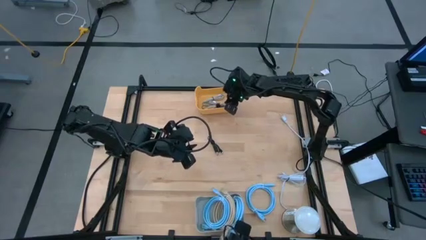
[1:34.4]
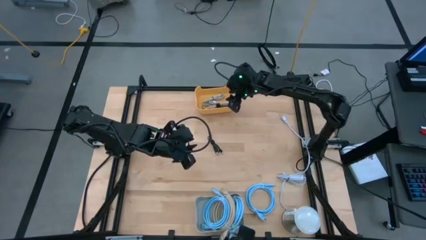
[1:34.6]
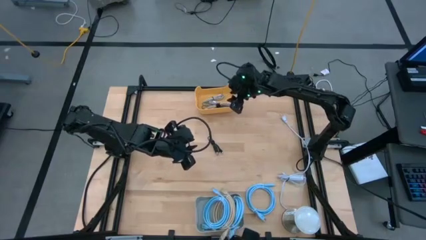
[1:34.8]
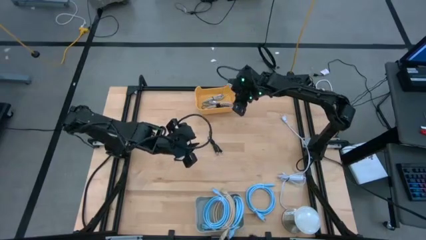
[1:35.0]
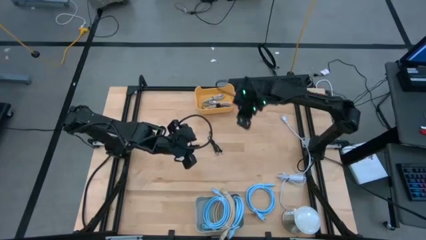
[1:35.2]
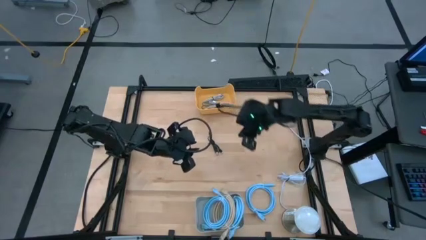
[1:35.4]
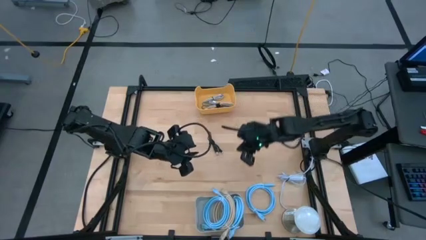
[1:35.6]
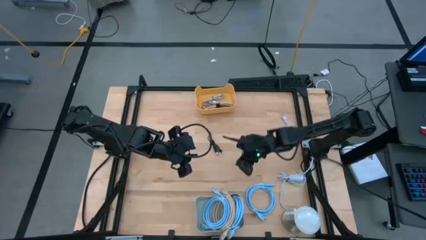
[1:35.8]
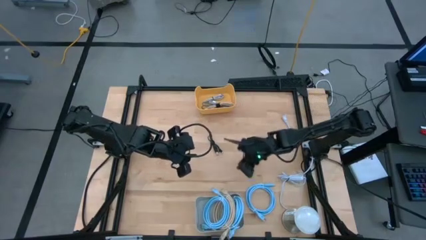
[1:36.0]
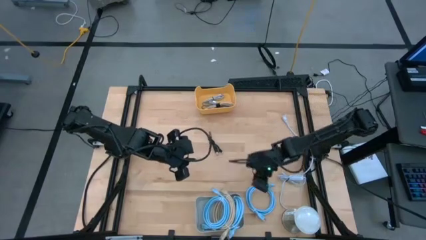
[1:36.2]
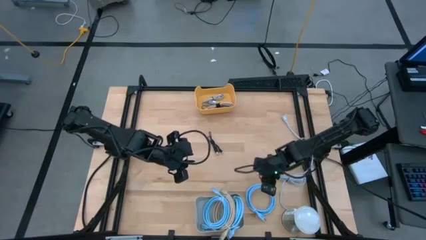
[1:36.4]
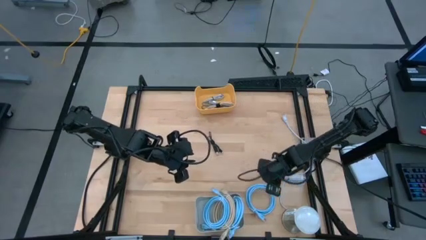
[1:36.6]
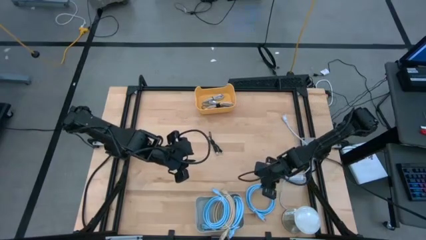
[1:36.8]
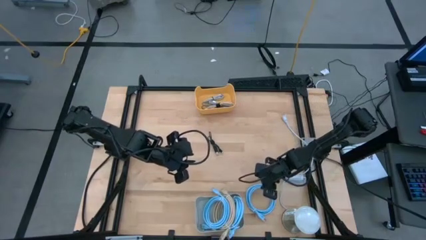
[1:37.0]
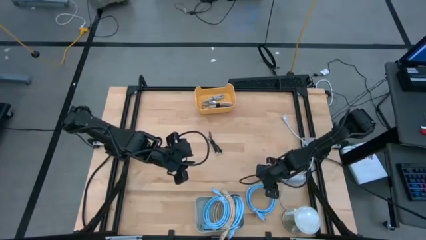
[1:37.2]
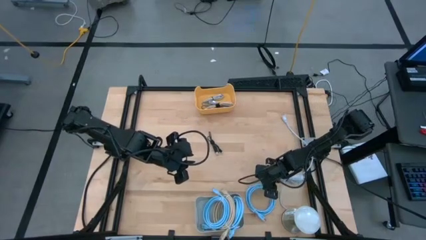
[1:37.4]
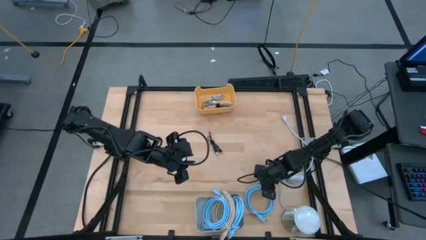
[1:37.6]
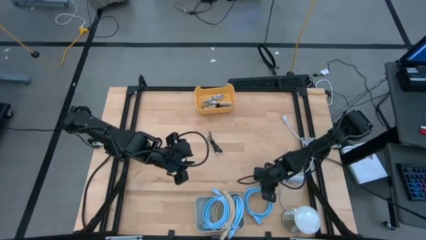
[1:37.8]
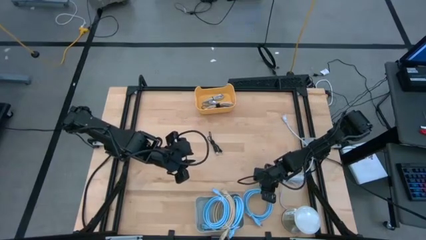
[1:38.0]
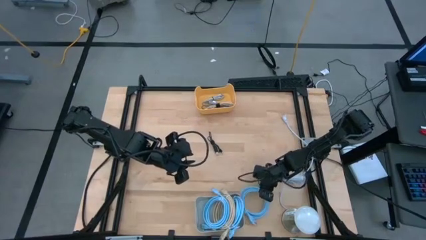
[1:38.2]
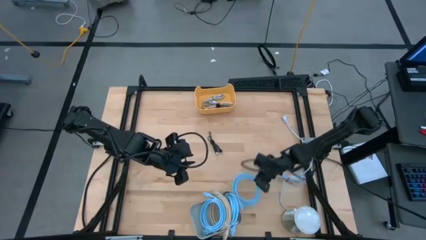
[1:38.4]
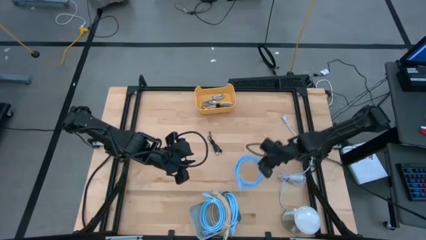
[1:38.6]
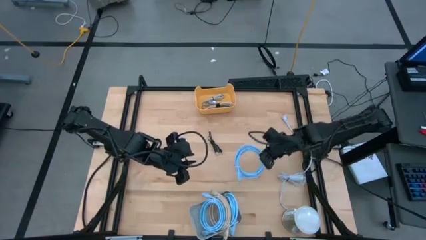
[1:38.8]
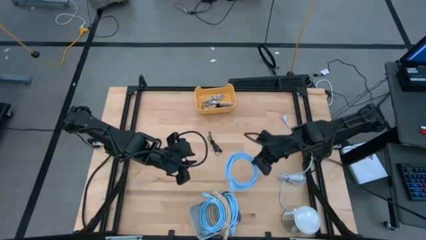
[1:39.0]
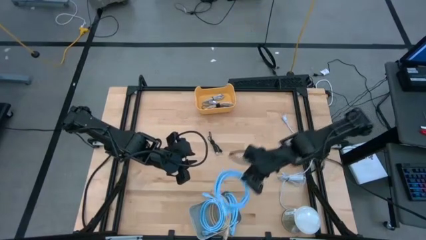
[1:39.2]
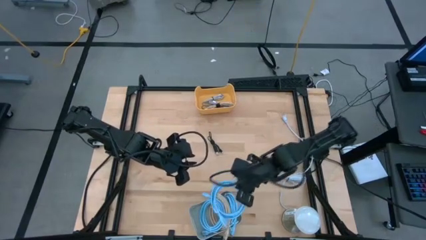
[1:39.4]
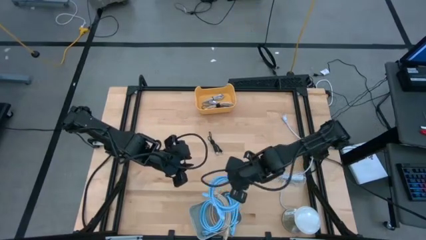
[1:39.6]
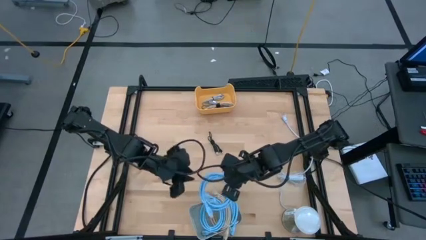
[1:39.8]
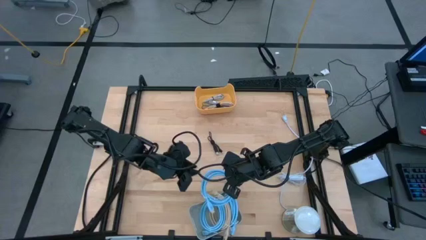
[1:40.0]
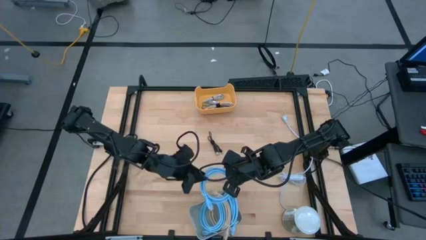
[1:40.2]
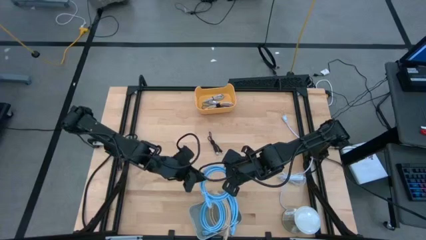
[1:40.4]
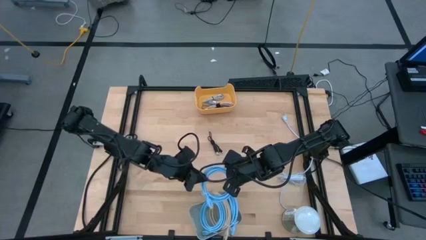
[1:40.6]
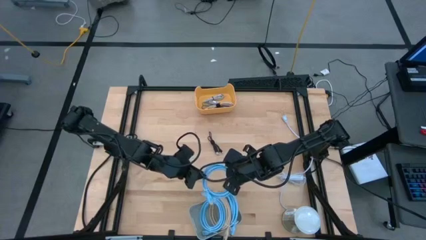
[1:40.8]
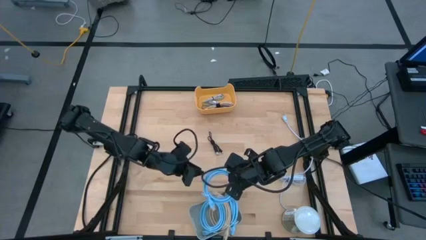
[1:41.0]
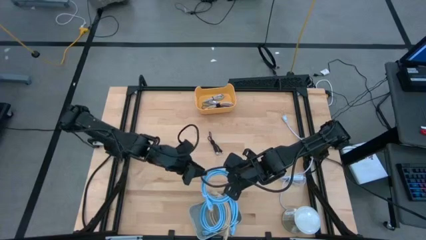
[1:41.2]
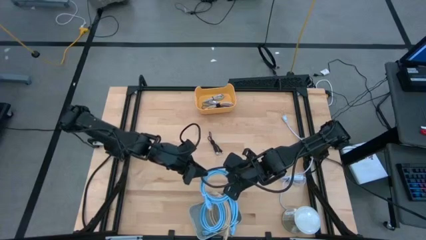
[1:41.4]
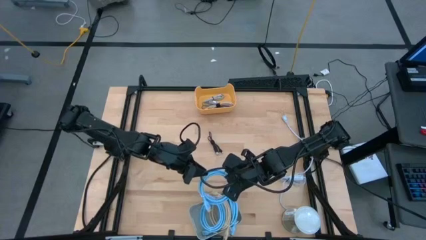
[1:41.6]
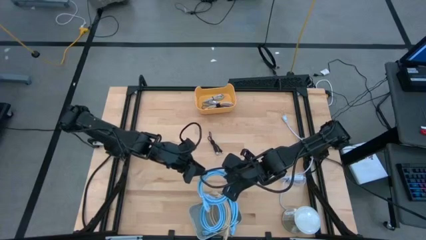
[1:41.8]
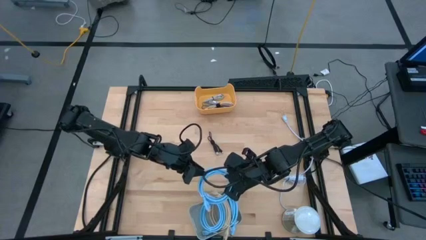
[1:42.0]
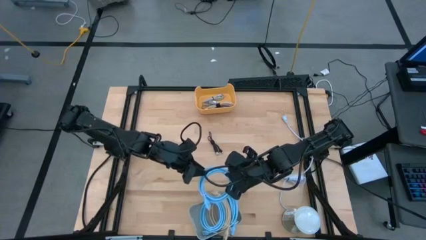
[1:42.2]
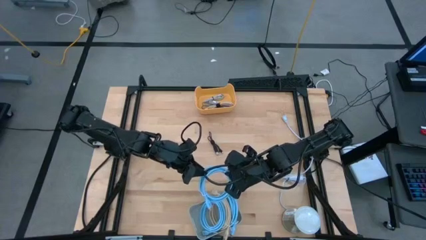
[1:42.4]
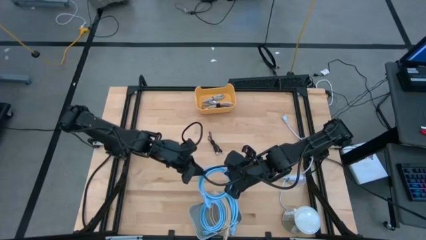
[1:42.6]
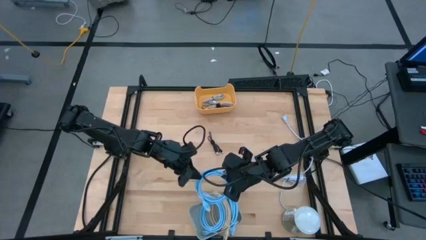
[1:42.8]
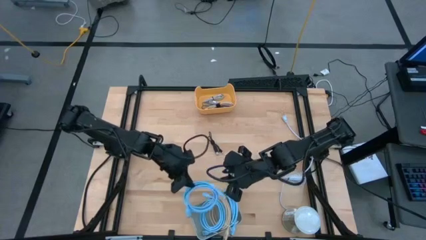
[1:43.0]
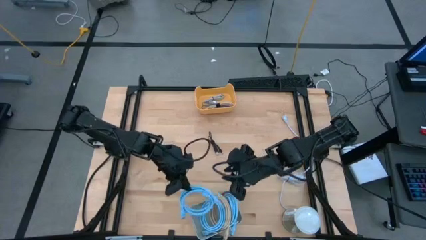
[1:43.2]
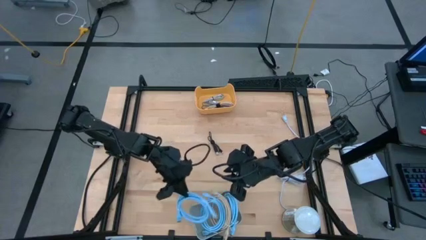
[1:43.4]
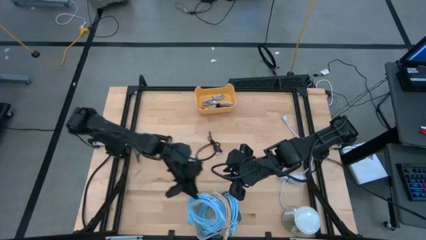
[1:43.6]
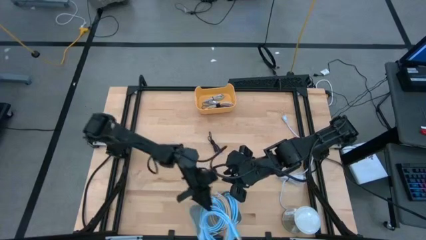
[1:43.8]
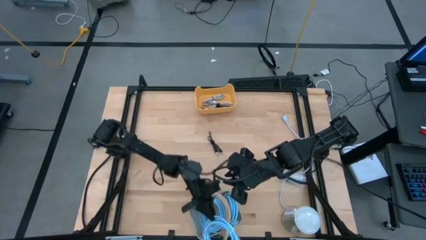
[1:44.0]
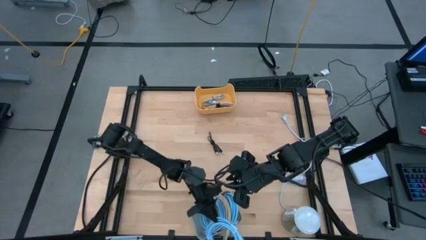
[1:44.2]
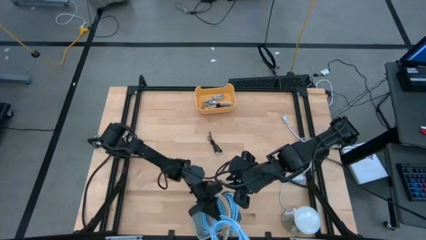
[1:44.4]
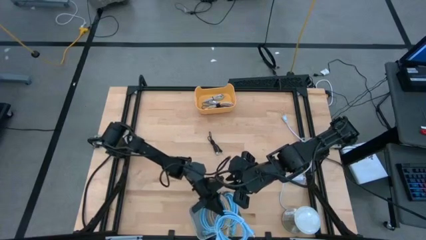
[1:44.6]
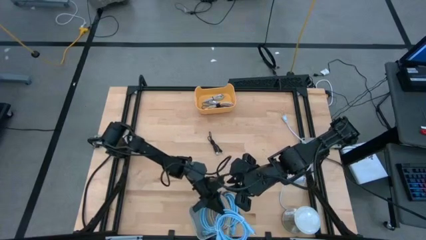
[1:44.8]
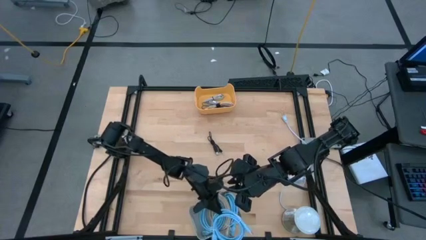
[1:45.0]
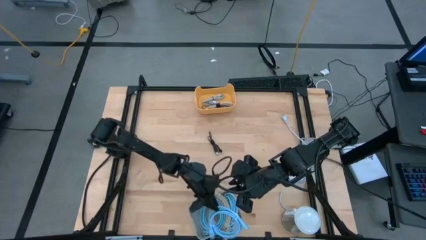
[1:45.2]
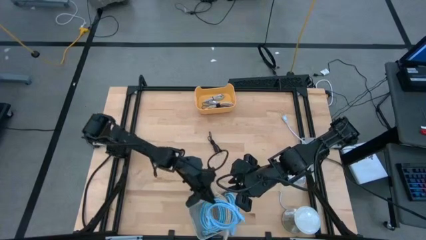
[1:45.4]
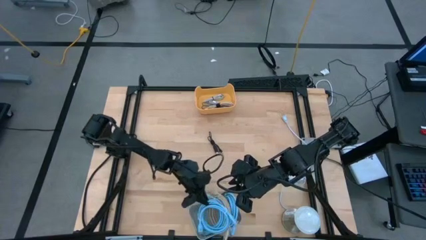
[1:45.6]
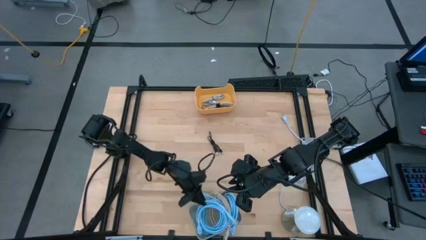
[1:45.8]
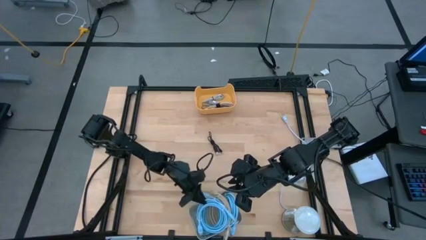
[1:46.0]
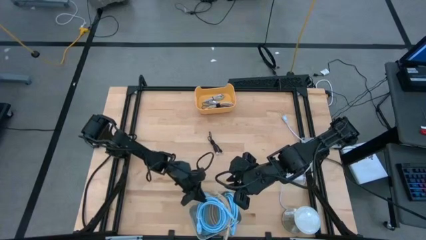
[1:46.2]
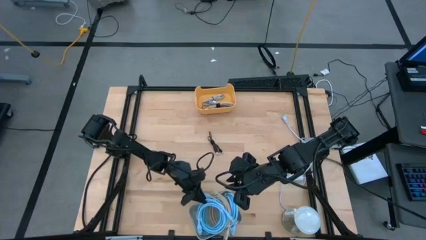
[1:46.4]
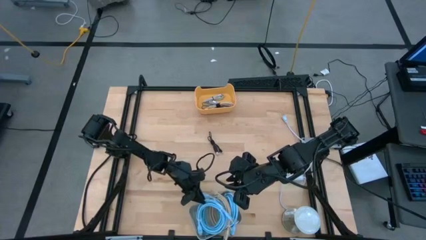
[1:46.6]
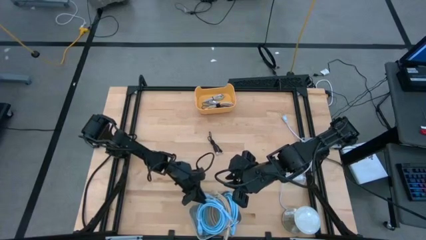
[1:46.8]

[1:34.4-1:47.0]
Task: Sort cables into bins
Put the blue HDMI cable into the gray bin

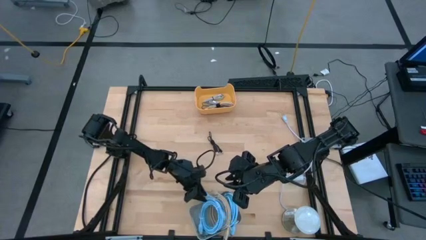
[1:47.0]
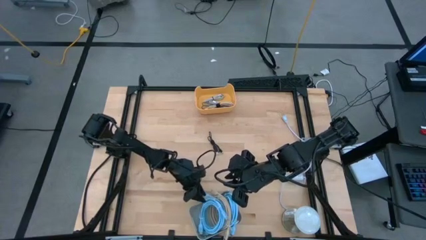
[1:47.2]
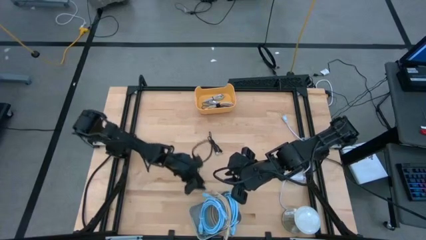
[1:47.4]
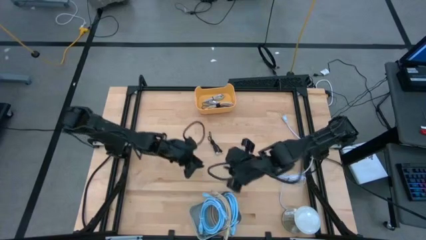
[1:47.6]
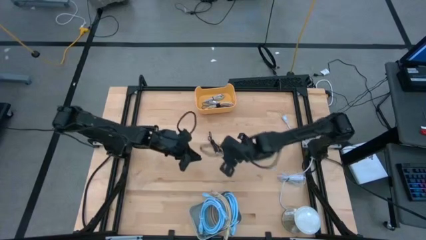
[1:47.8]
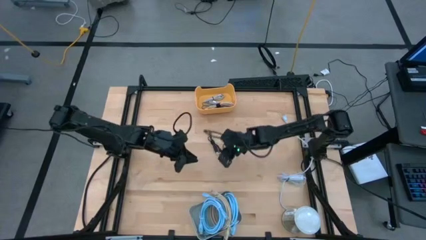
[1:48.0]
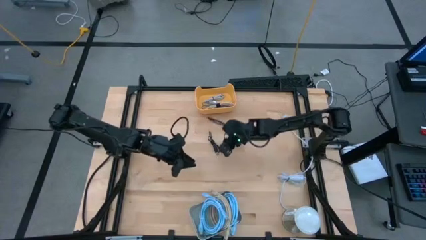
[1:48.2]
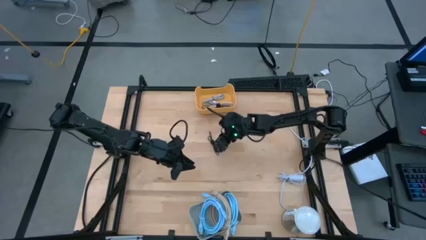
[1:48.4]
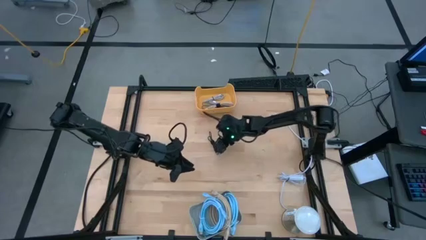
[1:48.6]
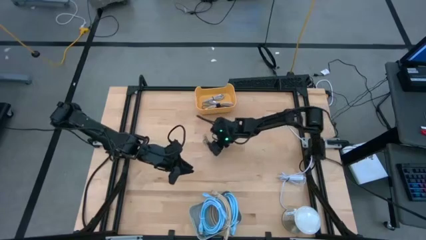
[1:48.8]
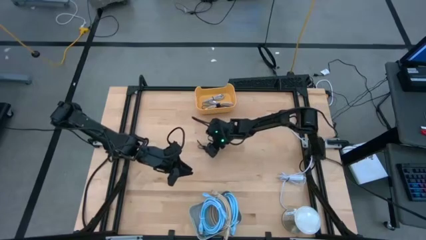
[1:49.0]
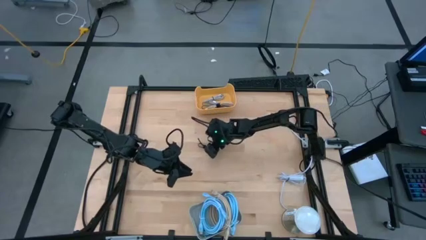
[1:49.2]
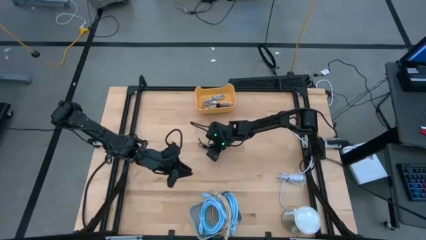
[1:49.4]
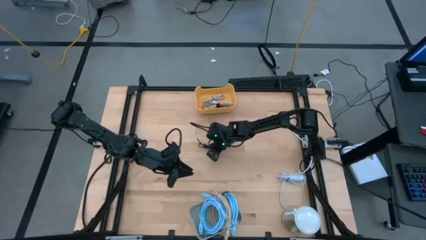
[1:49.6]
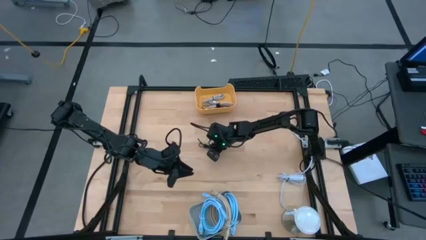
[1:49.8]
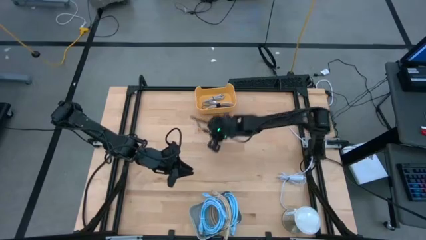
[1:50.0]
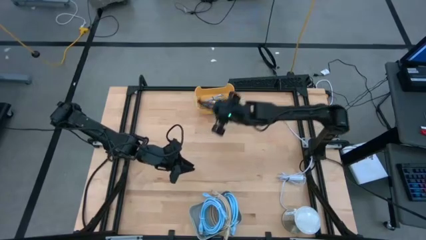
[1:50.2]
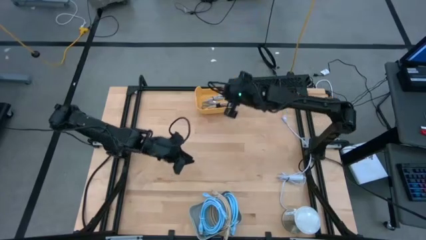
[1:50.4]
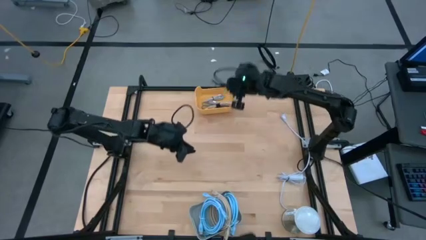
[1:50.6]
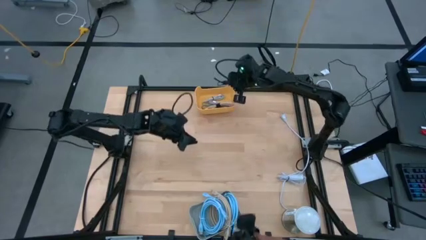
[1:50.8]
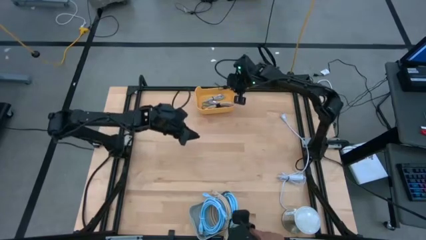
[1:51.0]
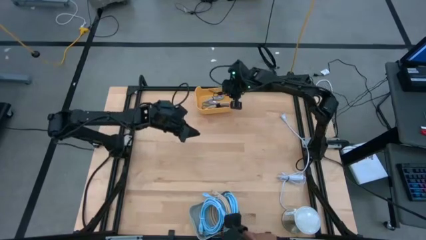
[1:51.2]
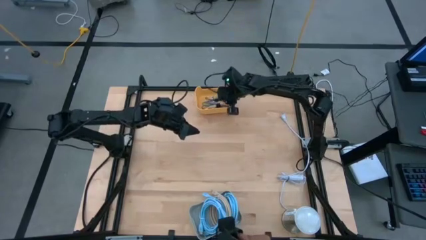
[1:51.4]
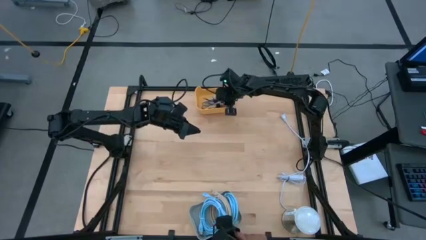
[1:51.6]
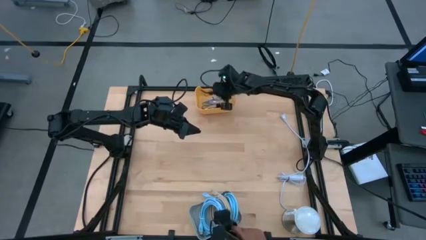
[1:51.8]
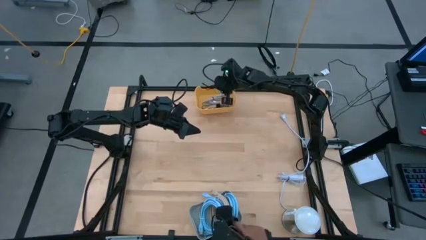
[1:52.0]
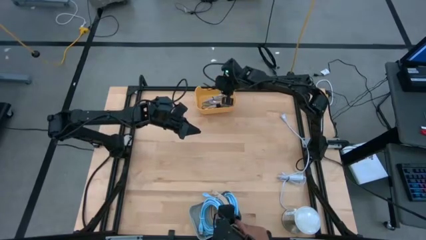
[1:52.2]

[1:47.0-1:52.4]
Put the black charger cable into the yellow bin
